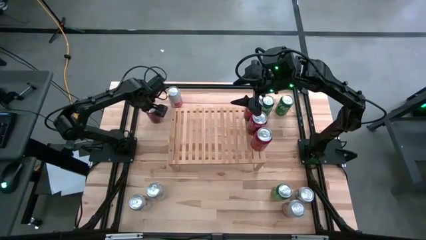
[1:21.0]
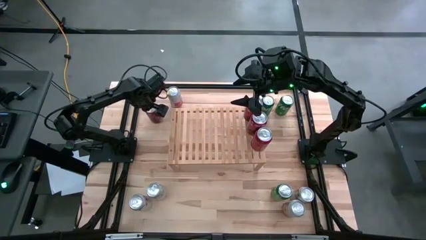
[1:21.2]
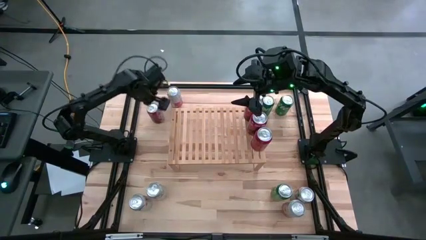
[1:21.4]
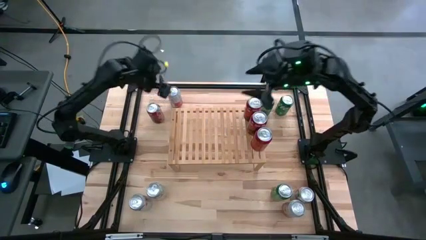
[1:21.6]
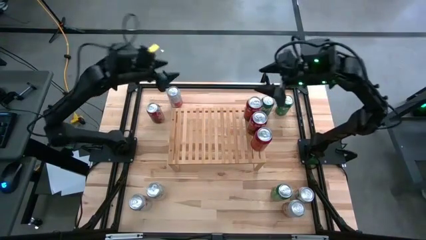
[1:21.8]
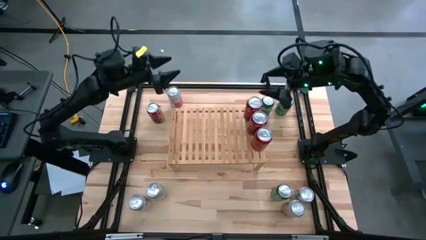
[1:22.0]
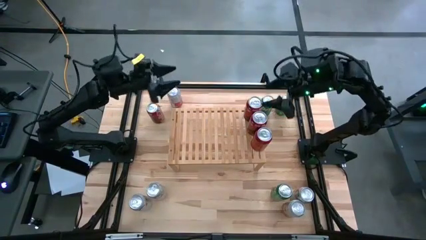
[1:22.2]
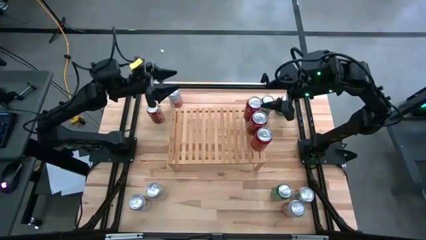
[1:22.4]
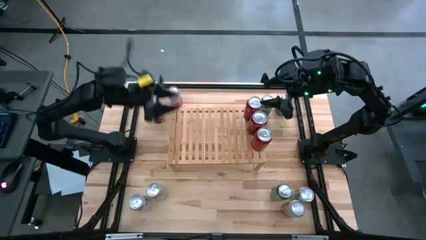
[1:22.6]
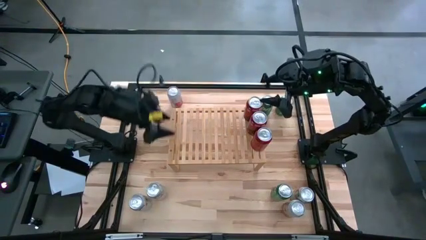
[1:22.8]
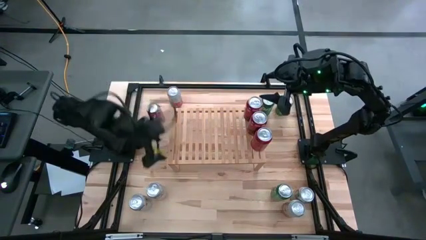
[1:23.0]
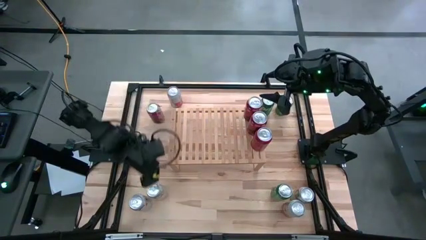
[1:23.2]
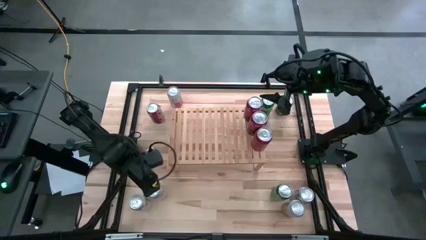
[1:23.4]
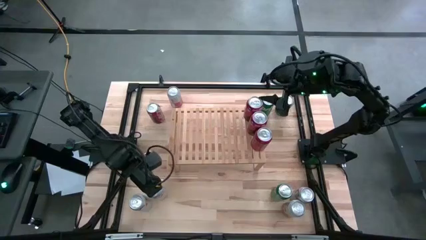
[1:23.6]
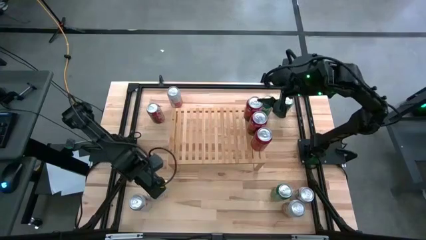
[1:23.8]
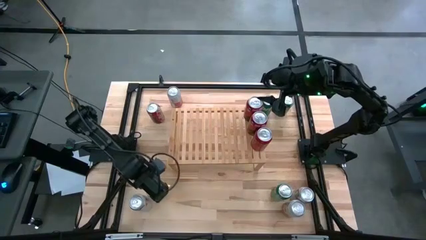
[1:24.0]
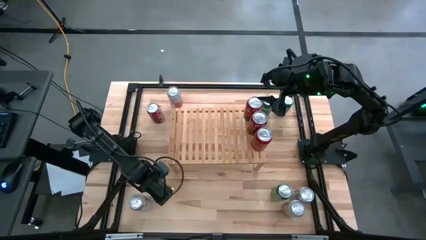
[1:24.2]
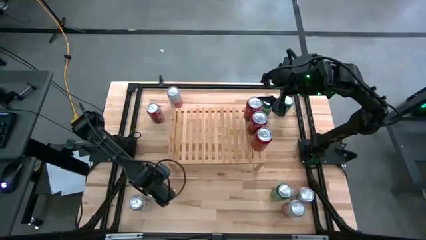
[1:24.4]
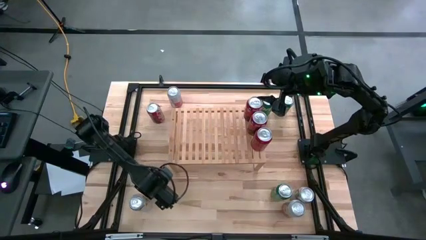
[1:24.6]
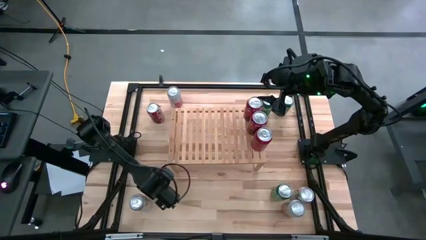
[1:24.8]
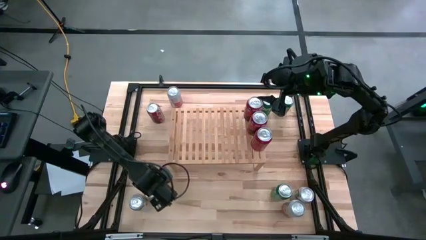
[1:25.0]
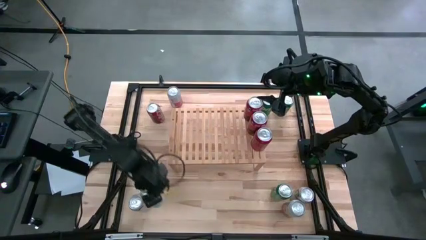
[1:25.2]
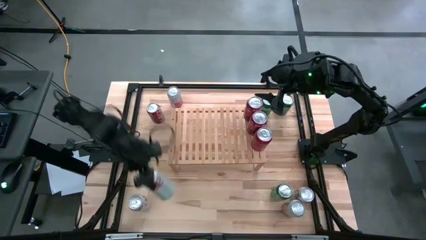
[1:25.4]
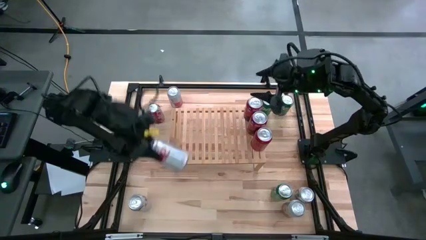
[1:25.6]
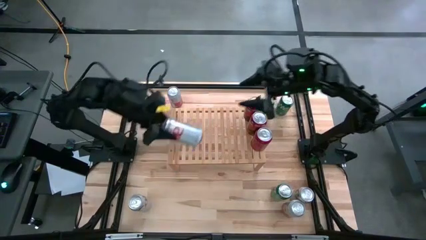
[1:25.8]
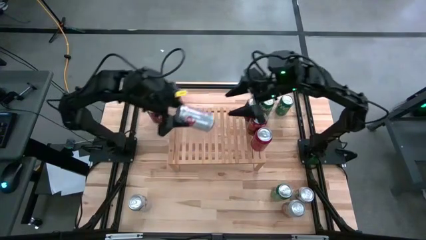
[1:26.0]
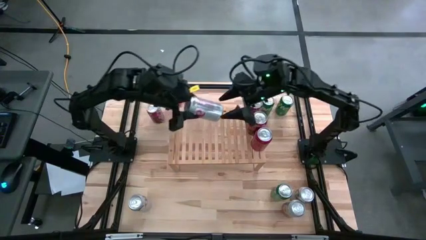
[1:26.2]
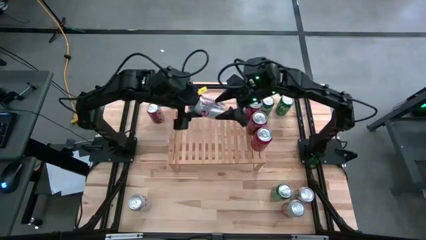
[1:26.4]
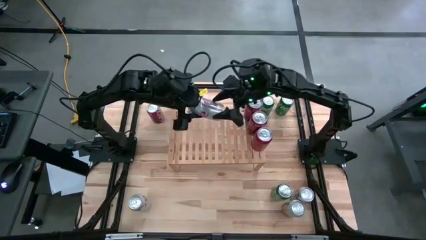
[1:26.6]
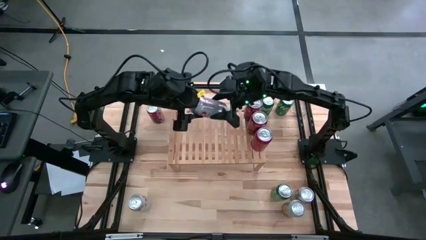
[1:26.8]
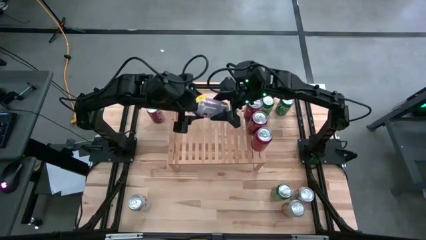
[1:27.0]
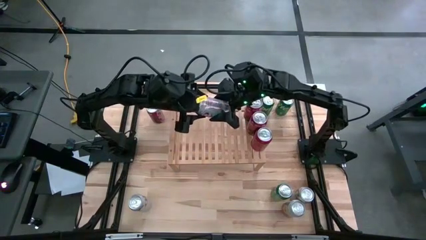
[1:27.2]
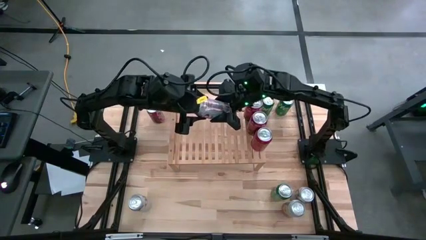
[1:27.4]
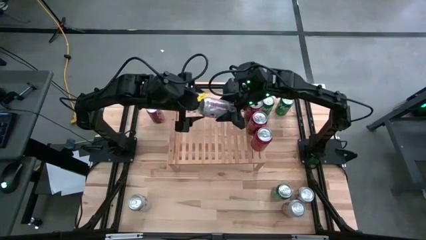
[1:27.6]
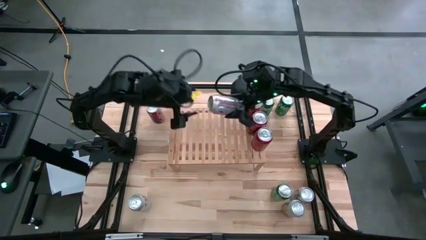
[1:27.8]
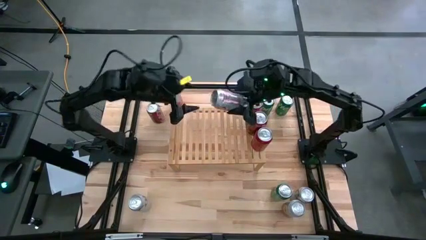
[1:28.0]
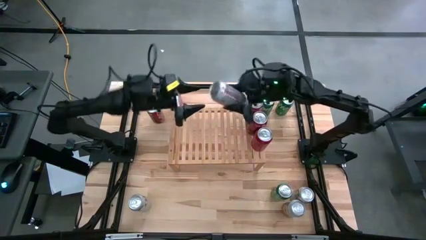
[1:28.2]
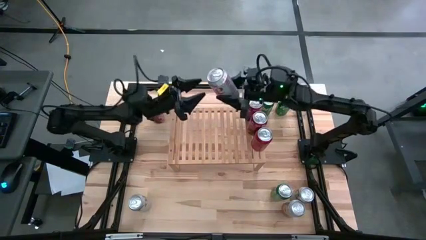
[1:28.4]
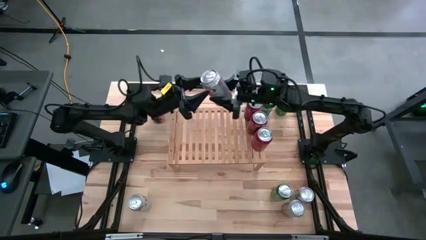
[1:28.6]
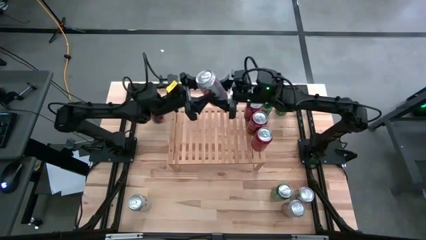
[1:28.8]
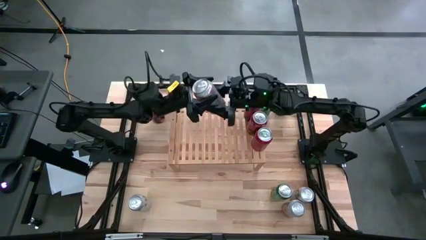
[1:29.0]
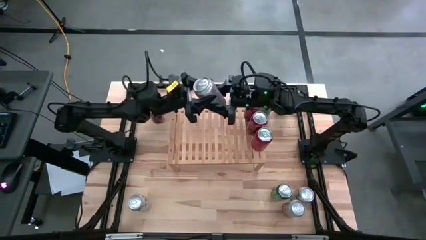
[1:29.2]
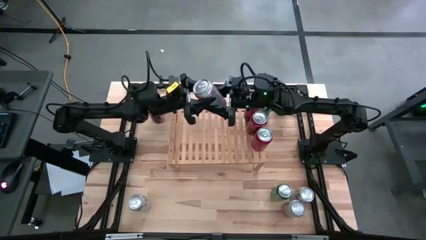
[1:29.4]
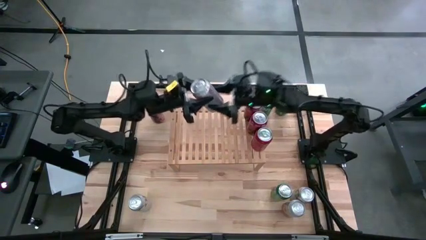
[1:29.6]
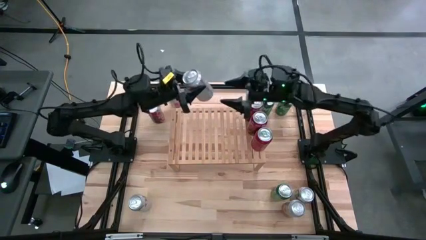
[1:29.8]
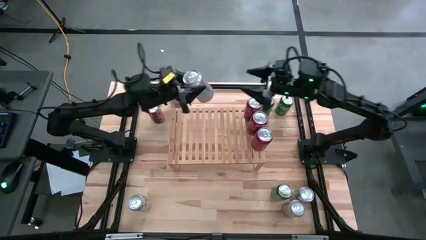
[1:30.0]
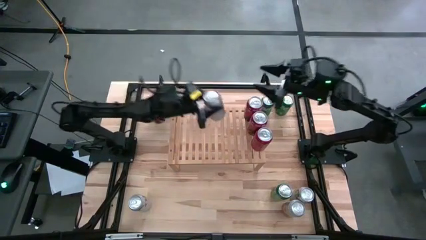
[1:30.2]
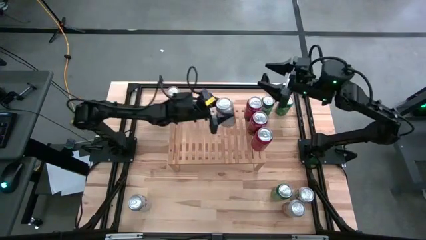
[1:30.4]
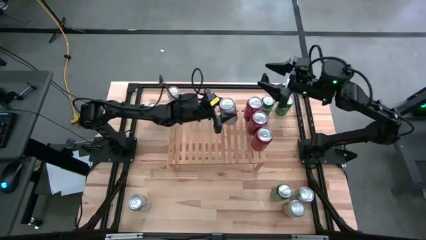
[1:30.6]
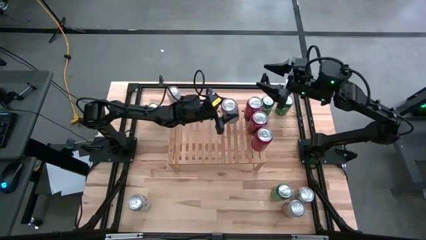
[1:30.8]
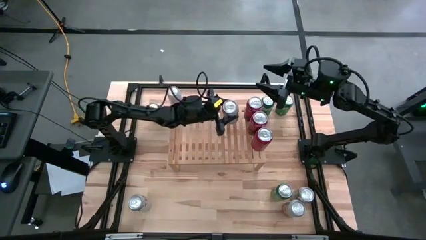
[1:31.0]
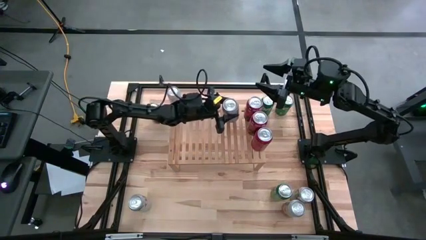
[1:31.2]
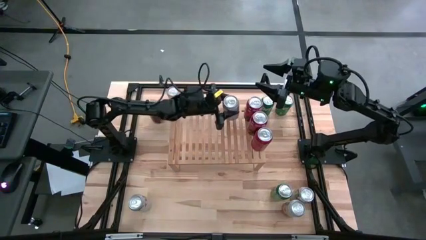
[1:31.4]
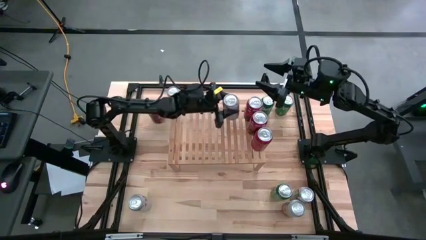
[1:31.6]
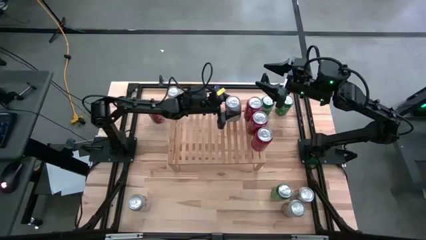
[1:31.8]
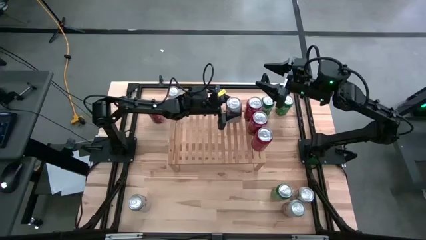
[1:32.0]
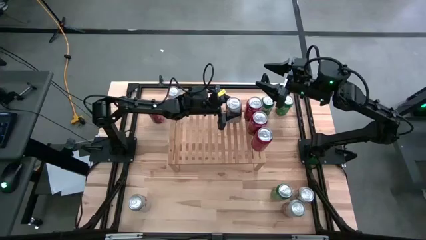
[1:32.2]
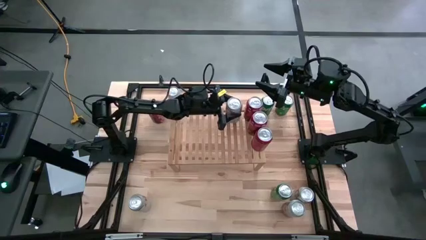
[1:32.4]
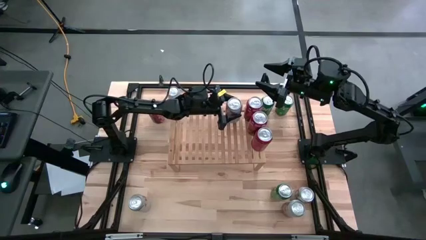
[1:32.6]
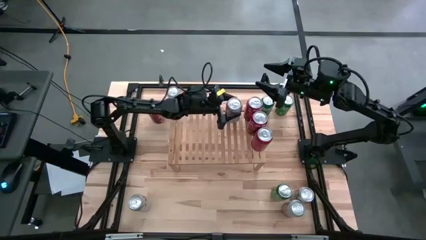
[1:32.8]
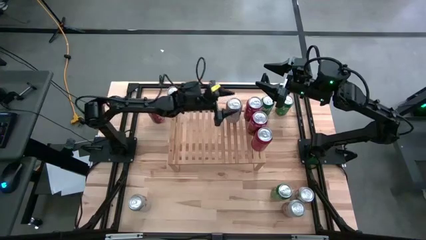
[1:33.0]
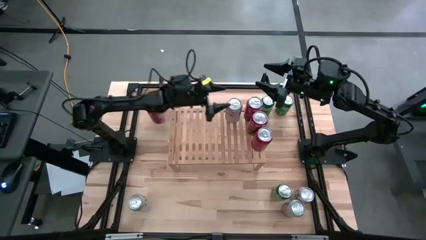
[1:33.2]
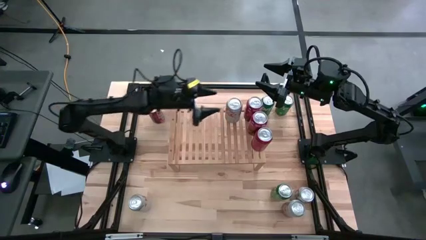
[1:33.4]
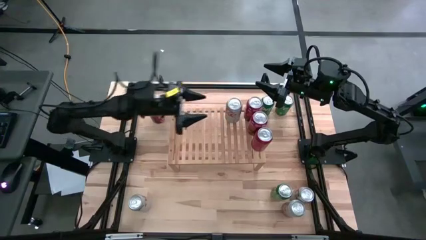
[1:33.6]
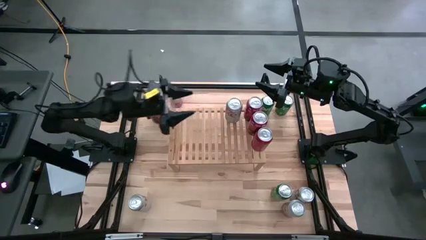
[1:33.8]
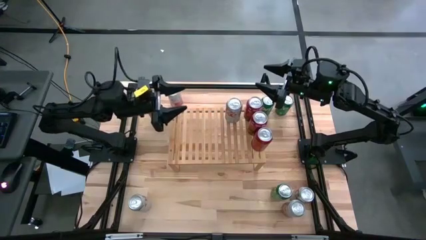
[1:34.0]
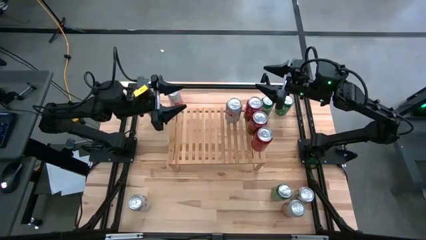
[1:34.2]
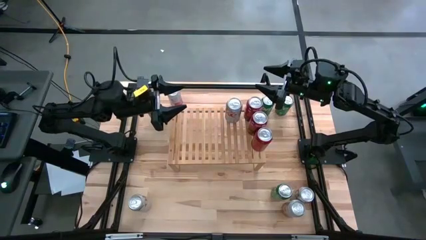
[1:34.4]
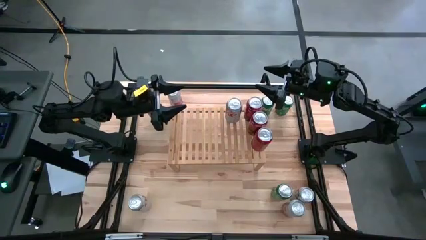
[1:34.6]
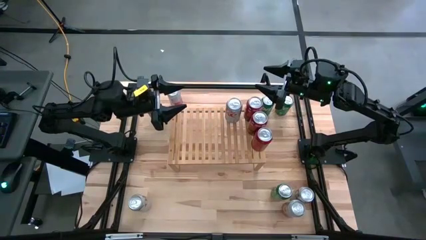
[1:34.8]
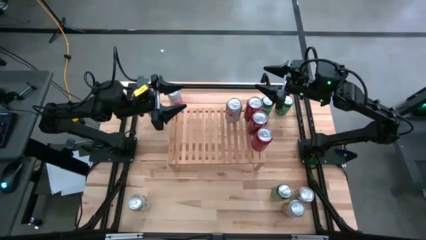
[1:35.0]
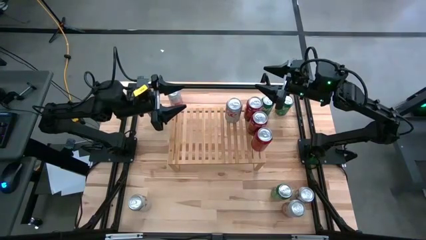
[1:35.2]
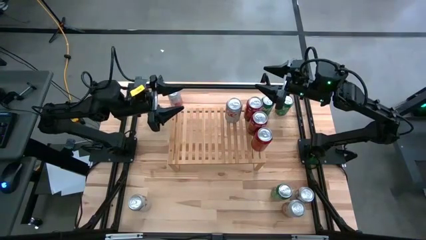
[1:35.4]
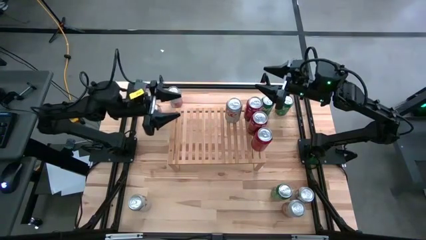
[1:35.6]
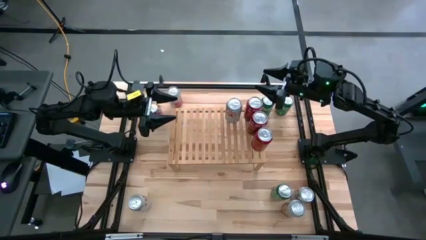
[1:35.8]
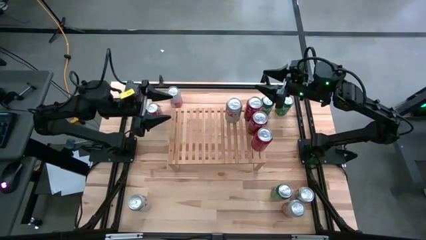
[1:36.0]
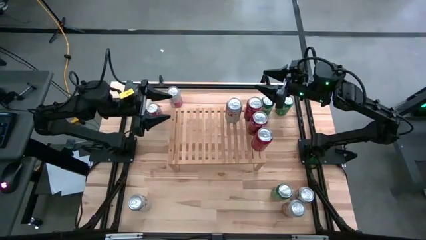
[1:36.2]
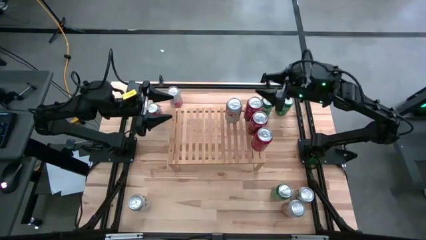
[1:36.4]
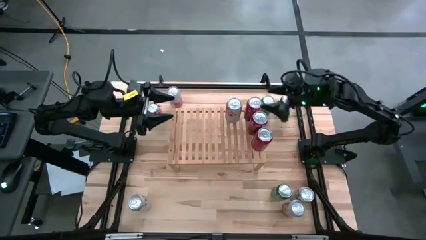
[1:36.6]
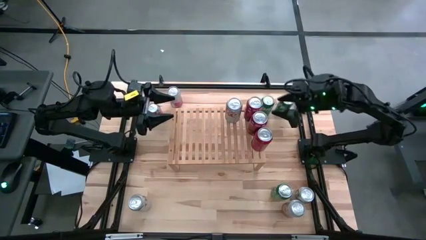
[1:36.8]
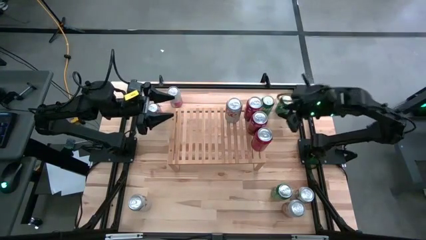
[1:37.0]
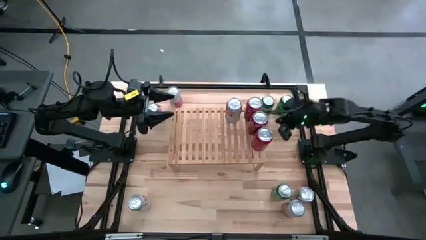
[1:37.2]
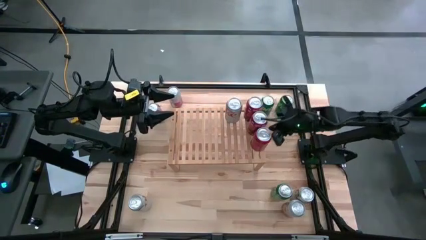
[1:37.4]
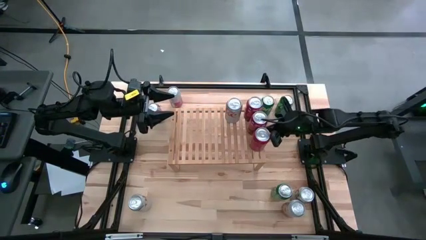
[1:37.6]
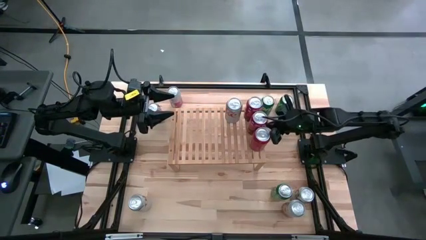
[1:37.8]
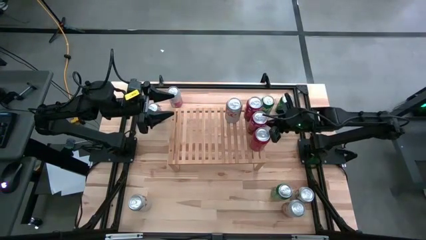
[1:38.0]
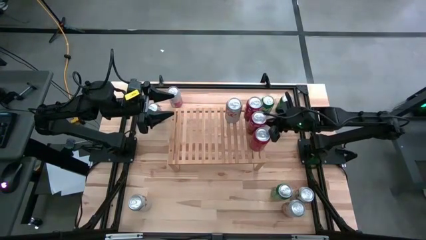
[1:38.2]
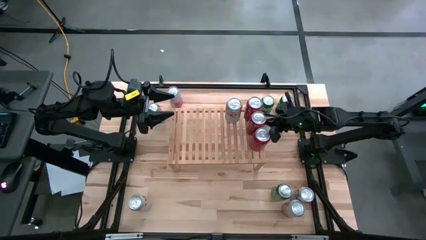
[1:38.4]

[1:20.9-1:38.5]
Task: Place canned beverage on shelf
Put the bottom left silver soda can on the shelf
